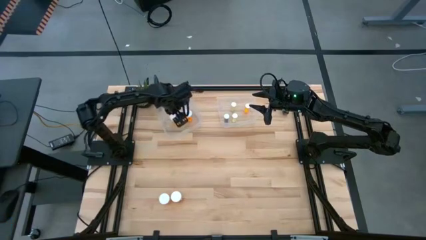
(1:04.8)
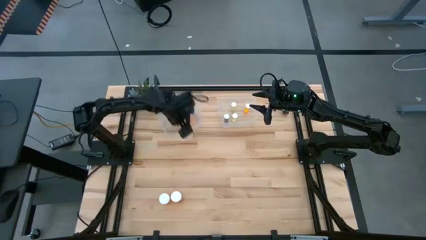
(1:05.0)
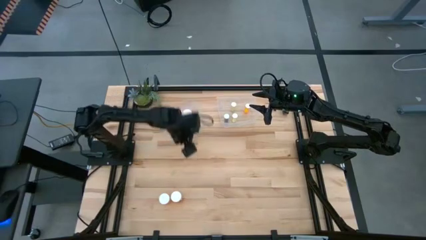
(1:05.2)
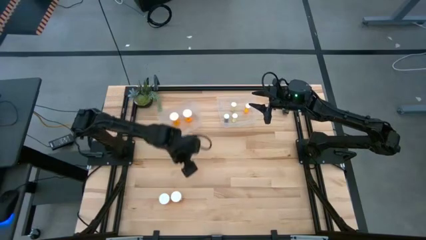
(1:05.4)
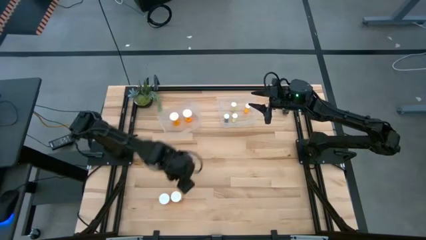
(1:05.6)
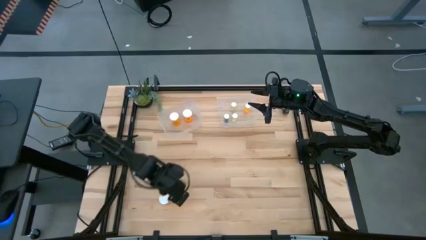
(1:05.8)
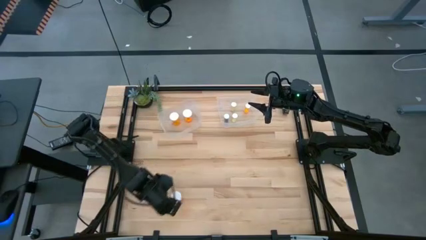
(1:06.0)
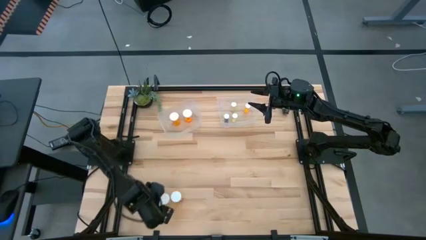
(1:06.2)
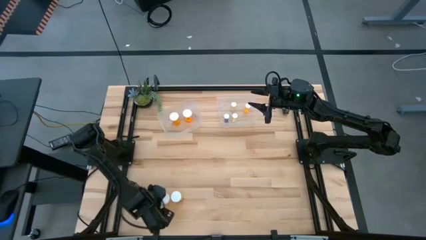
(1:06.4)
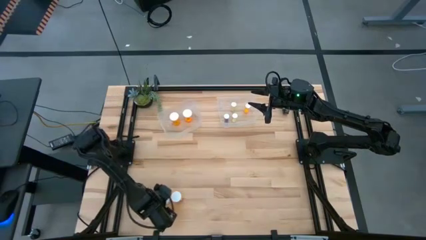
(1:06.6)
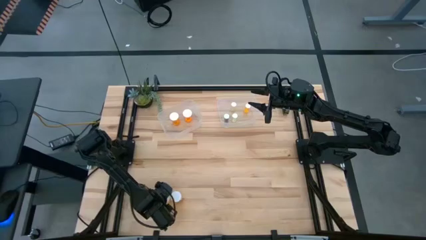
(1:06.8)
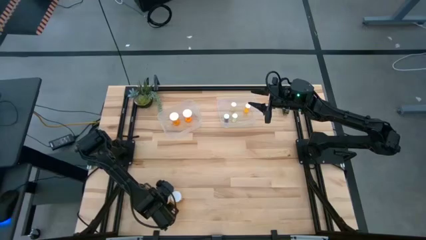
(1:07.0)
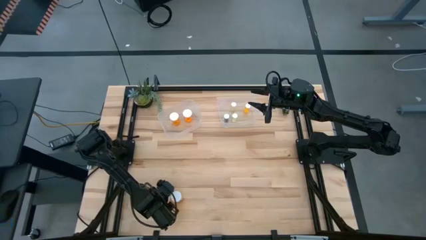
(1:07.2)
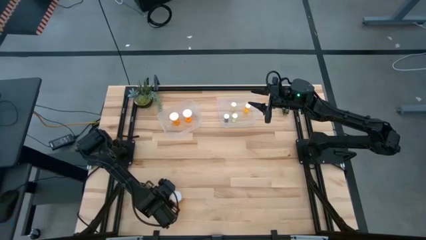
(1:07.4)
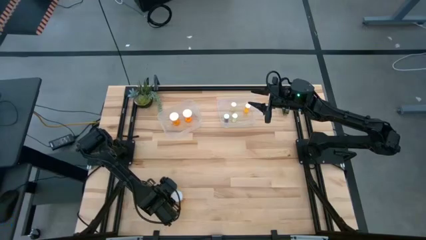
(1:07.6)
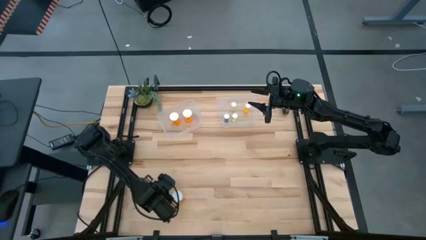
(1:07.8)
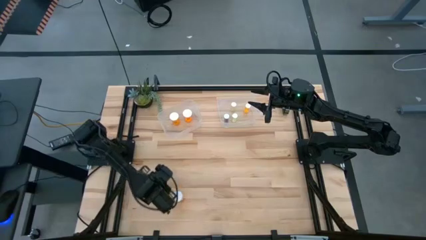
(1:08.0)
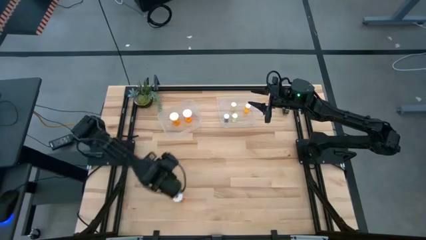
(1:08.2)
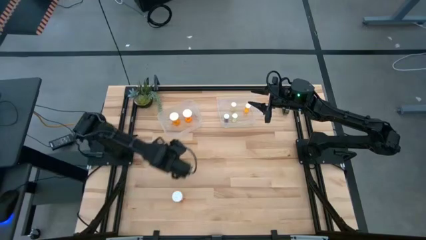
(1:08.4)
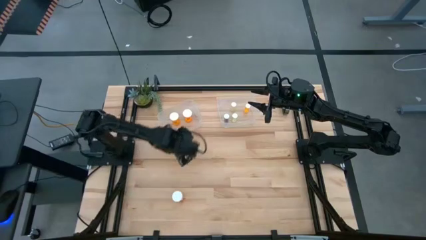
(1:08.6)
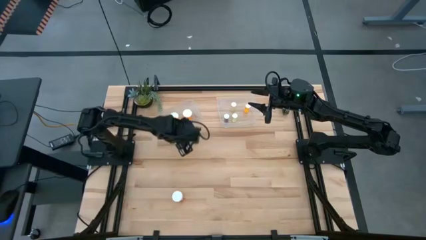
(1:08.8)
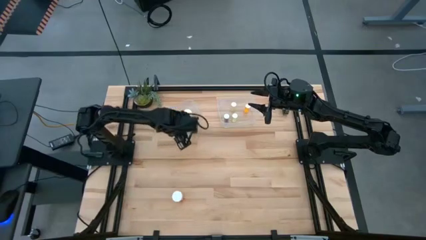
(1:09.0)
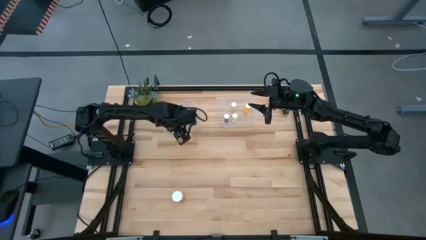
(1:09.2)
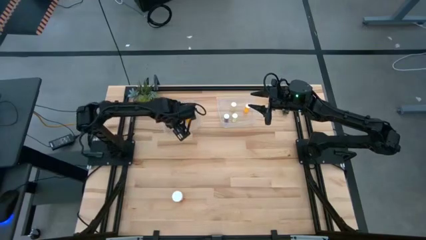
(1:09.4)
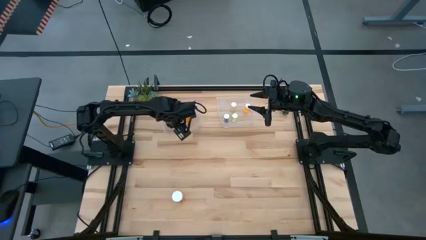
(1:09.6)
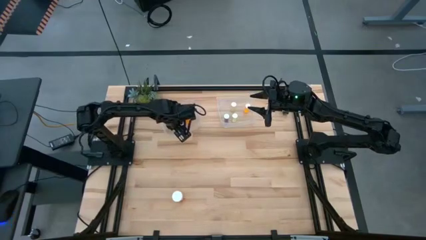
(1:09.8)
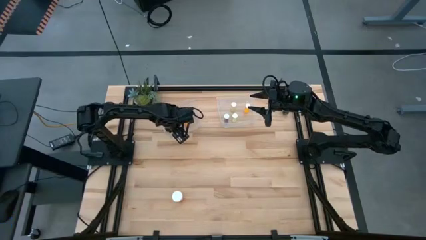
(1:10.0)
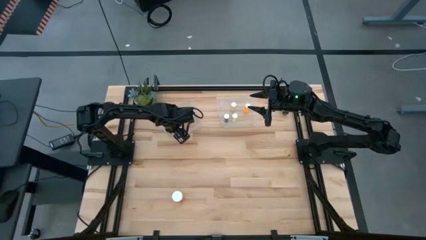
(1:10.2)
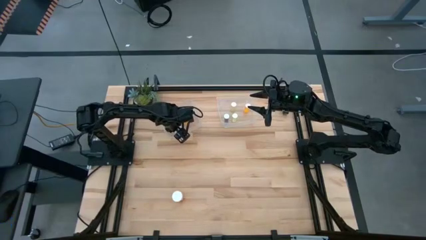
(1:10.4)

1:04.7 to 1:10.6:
Task: Pick and place medicine bottles into bin by pill shape (circle, oval)
Put the orange pill bottle into the left transparent bin

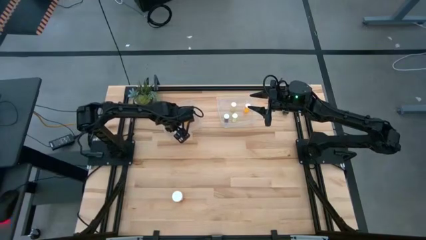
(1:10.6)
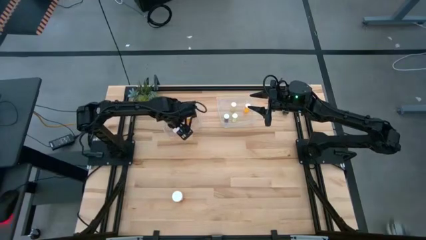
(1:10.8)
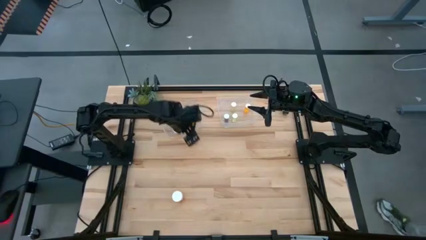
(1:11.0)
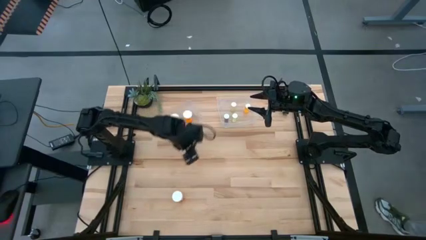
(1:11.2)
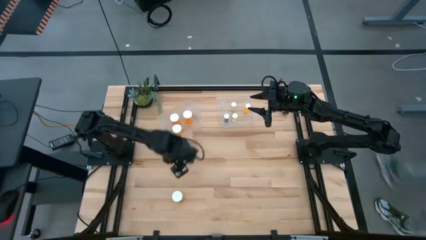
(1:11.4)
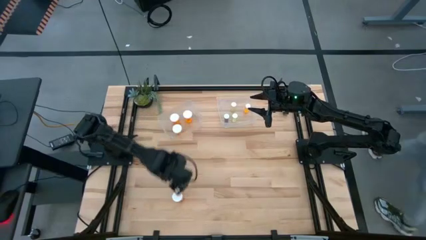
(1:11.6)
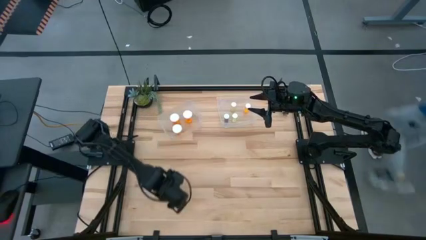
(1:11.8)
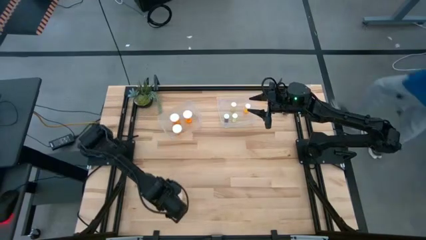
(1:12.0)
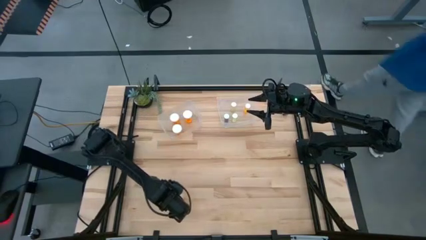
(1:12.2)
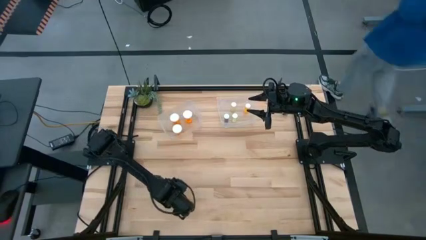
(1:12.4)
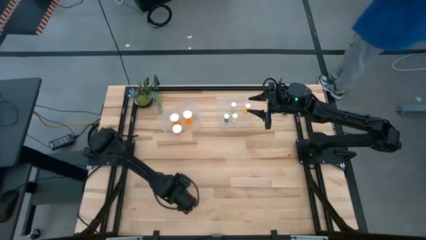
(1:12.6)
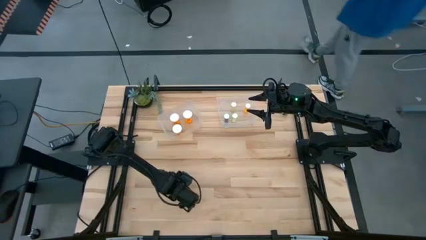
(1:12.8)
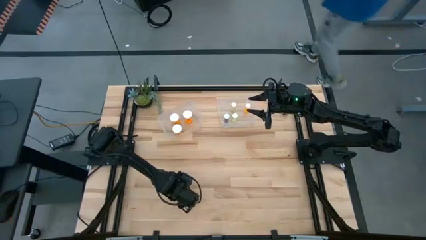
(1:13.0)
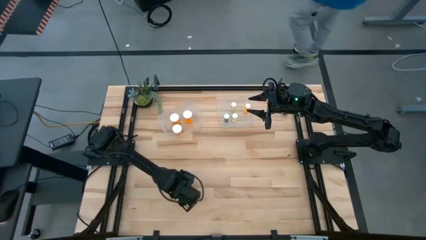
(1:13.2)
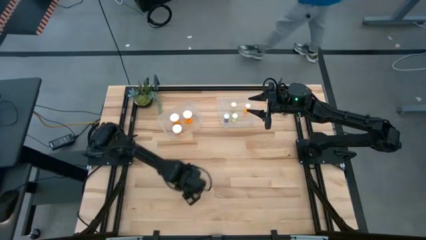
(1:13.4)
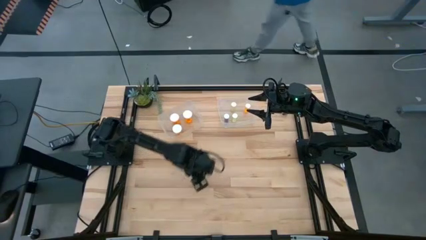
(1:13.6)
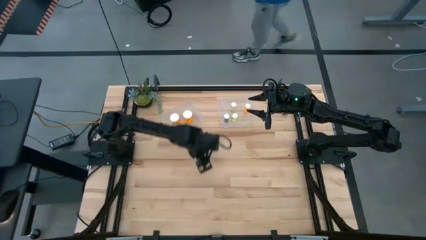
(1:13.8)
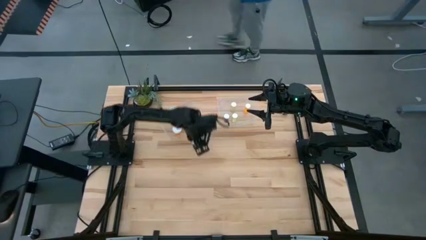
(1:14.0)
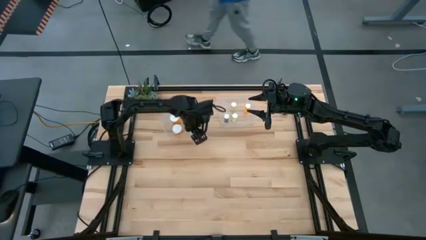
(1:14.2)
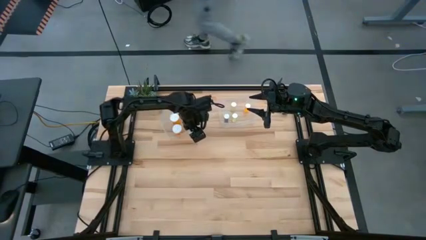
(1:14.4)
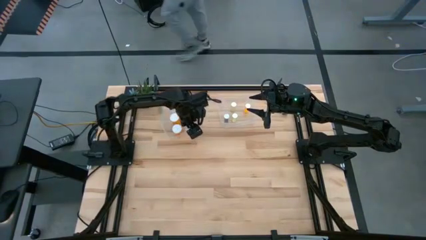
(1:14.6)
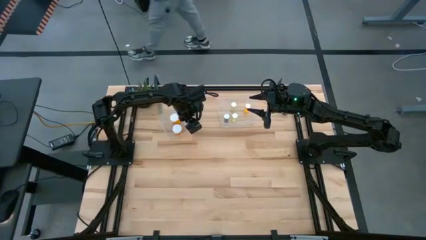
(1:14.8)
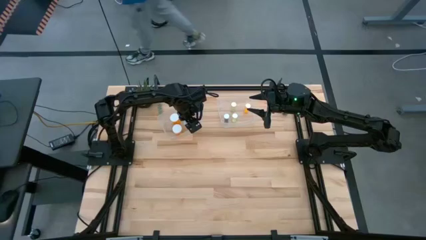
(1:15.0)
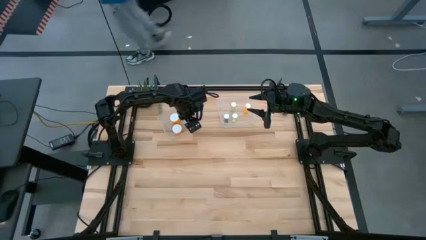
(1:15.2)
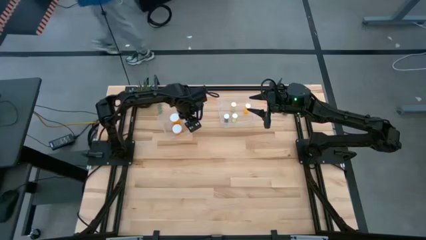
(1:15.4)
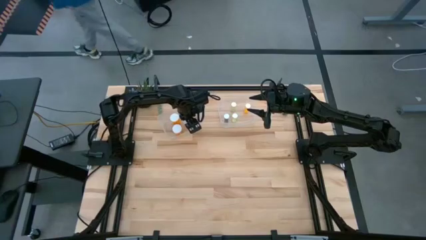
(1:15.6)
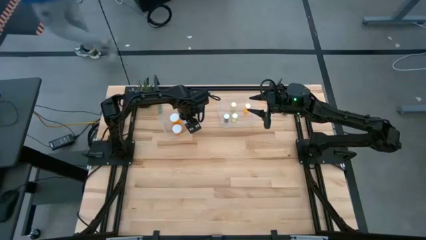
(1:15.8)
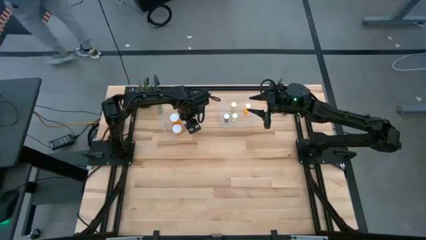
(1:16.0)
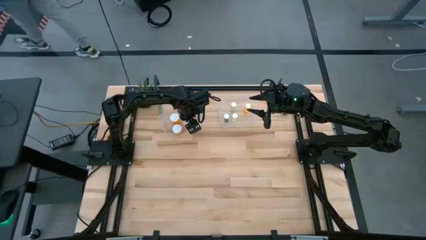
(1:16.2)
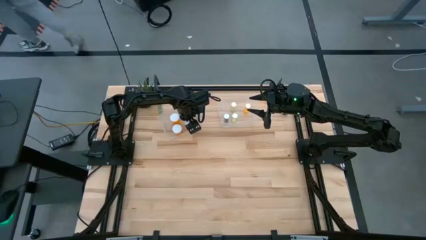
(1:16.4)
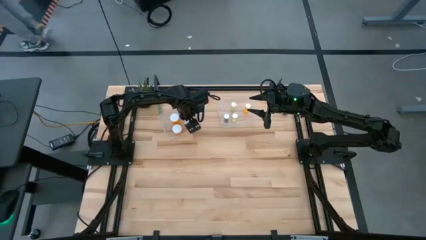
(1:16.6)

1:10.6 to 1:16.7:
Put the orange pill bottle into the left transparent bin

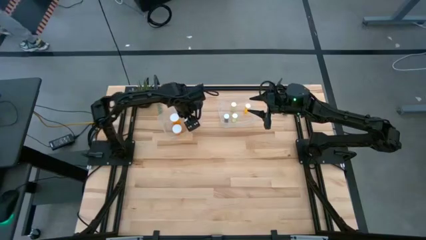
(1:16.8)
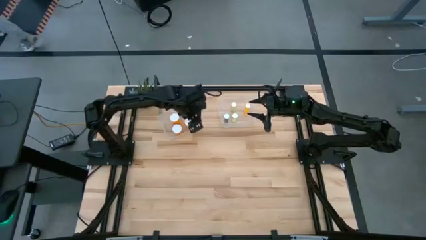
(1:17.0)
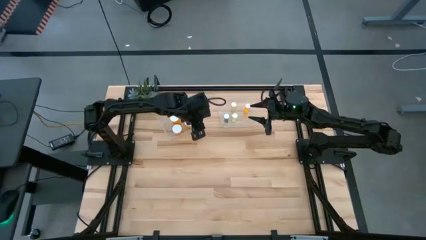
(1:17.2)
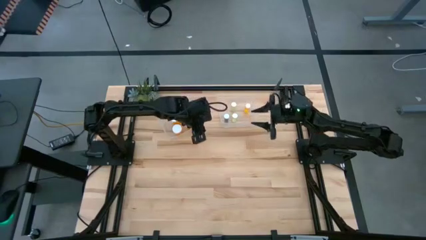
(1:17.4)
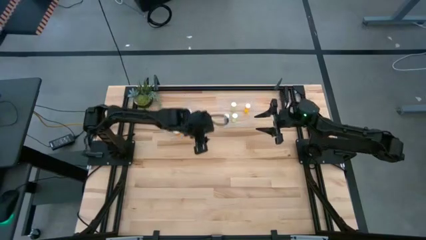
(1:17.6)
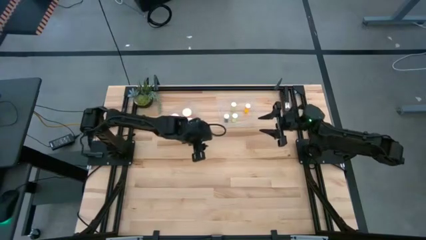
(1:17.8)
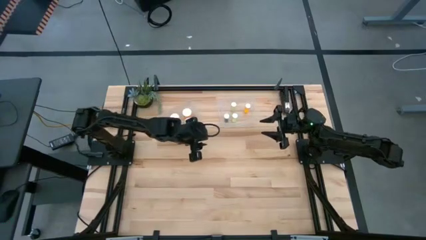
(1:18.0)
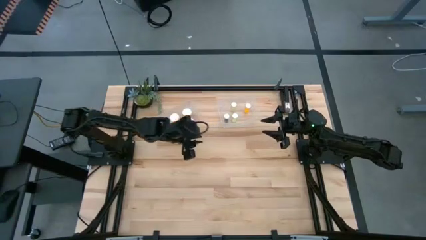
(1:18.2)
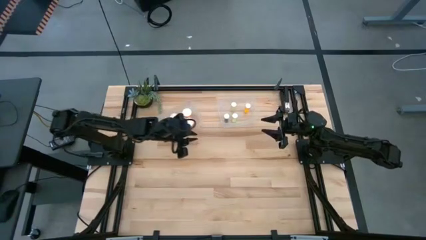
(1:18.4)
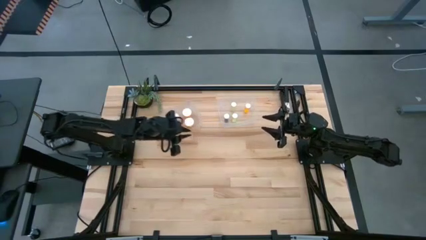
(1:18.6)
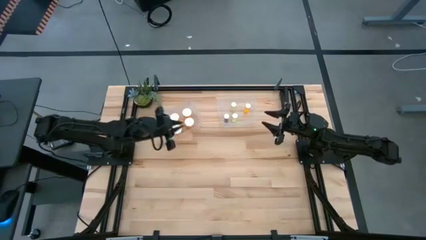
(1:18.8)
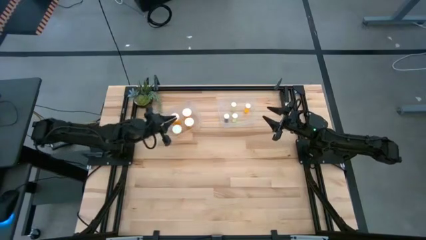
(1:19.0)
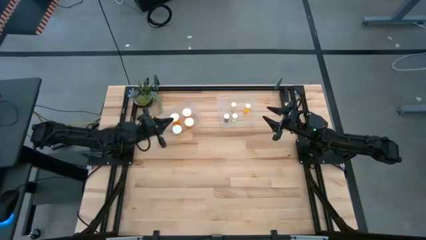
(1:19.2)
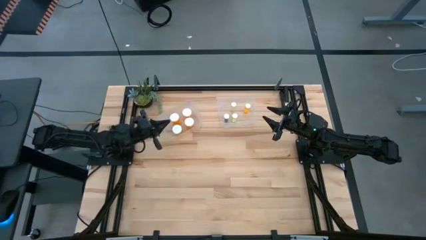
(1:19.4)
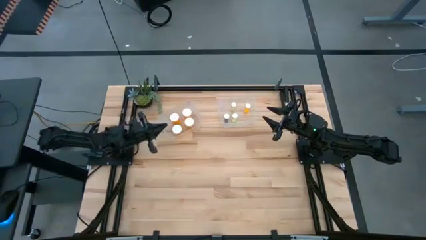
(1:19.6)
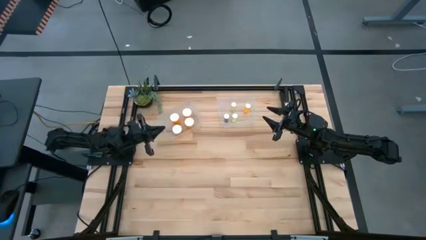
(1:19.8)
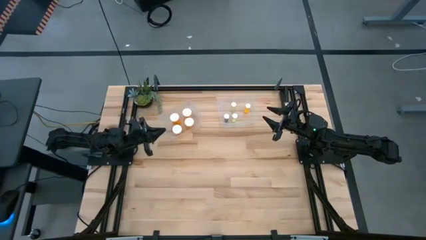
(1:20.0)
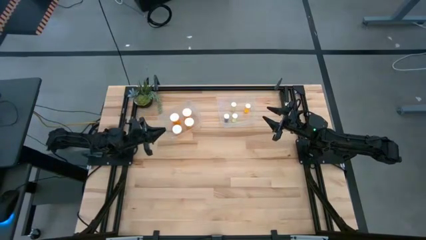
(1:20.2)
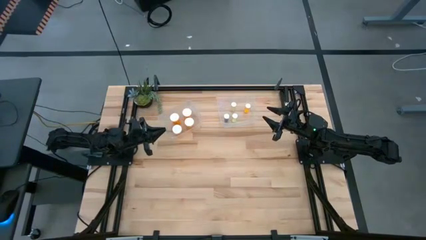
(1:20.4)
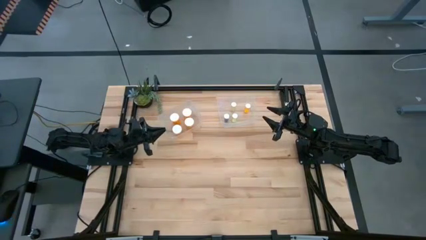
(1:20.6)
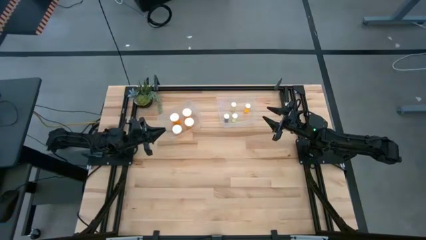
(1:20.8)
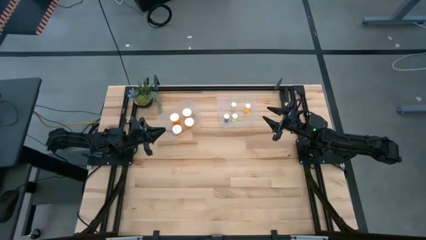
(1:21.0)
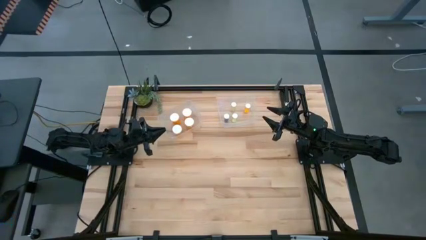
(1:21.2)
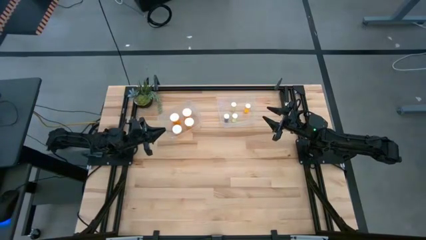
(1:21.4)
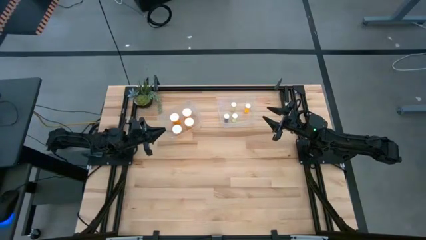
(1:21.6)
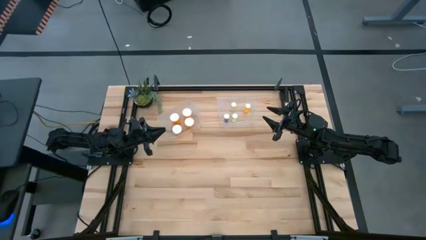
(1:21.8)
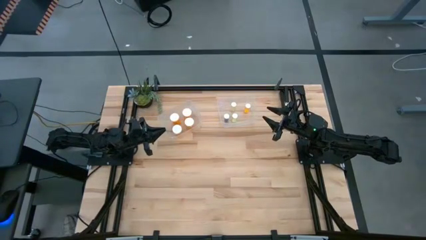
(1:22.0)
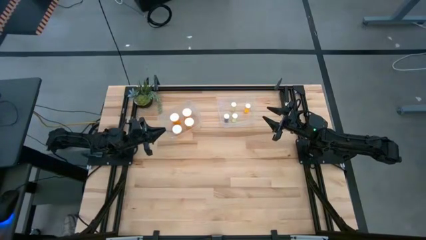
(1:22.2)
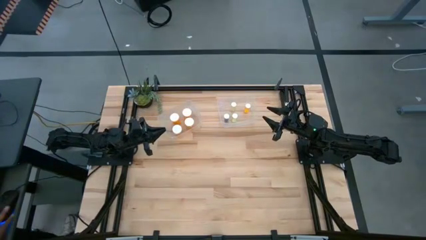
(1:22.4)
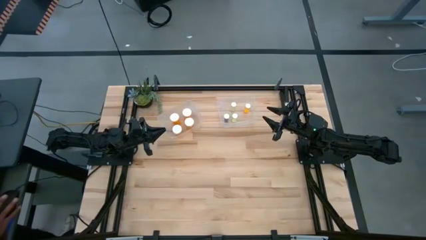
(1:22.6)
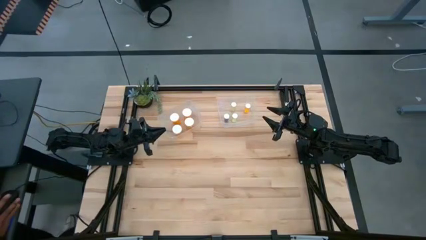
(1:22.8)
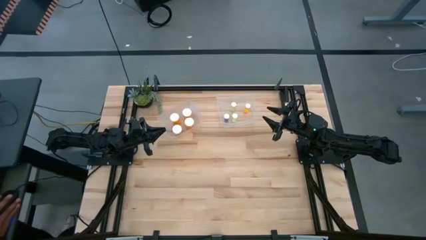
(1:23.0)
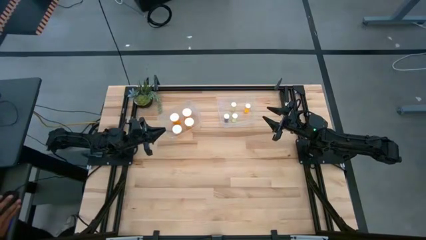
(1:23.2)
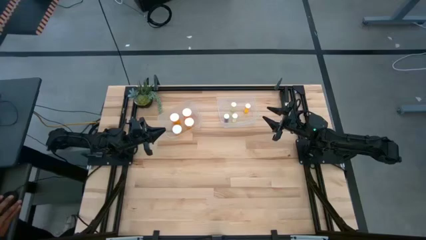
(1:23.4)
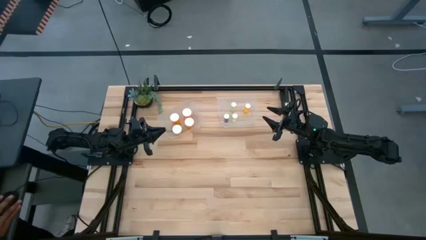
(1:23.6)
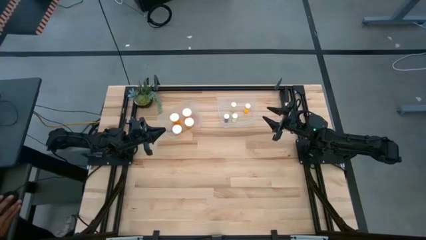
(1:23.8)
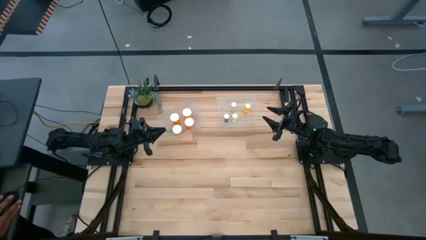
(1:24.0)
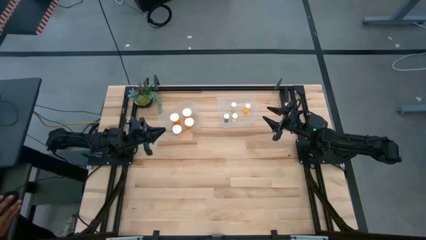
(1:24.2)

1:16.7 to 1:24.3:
Return to Home Position
